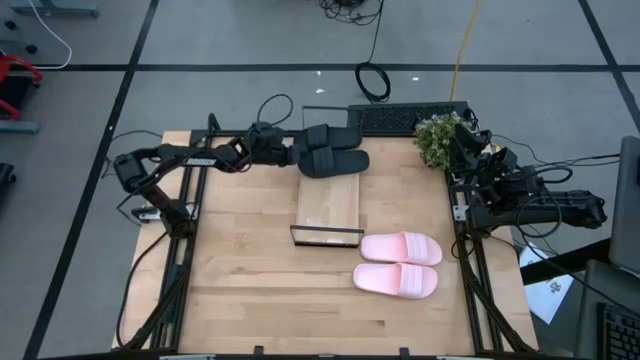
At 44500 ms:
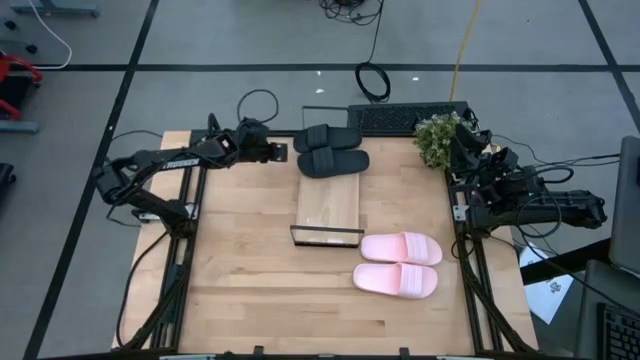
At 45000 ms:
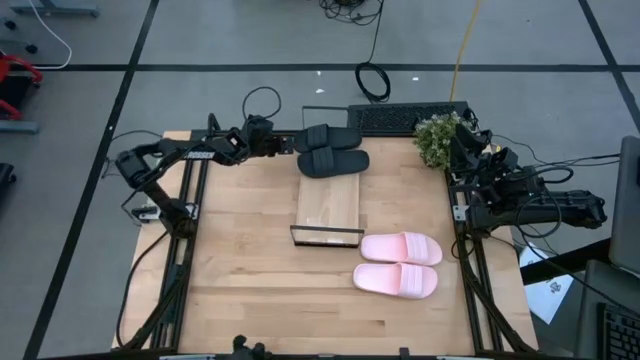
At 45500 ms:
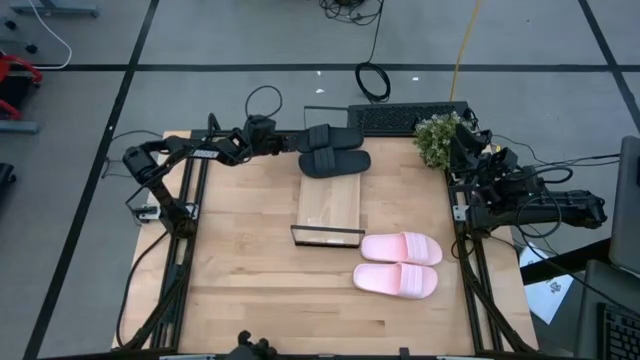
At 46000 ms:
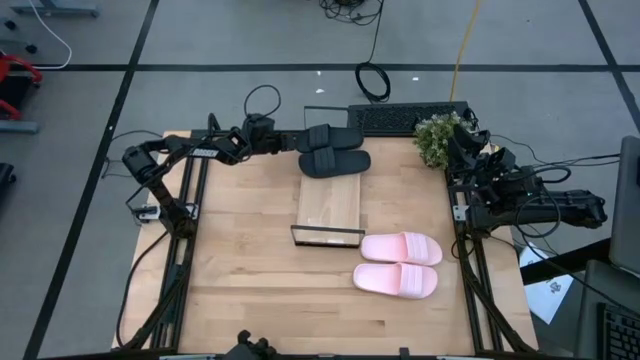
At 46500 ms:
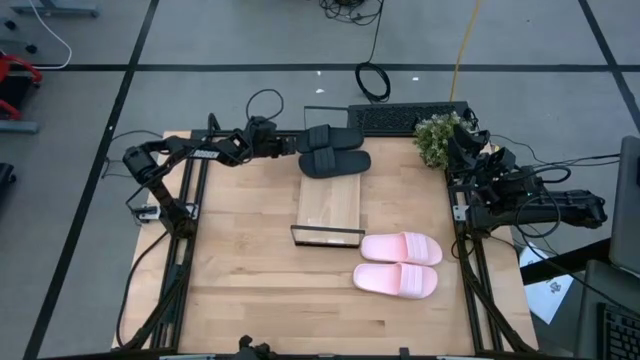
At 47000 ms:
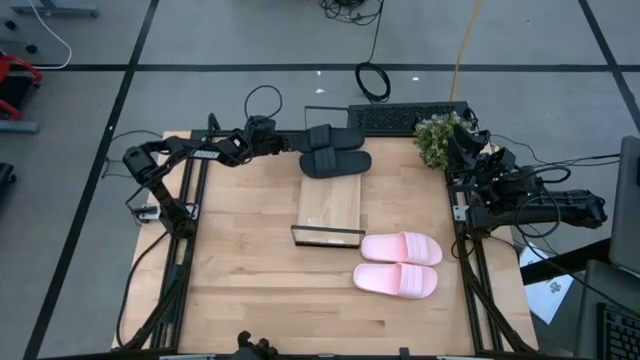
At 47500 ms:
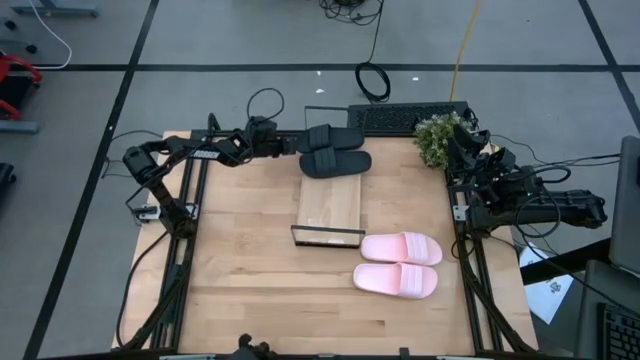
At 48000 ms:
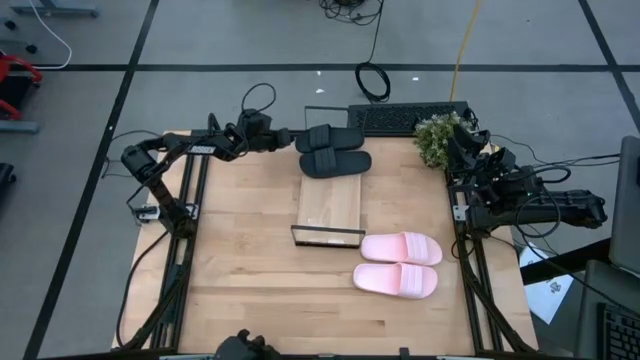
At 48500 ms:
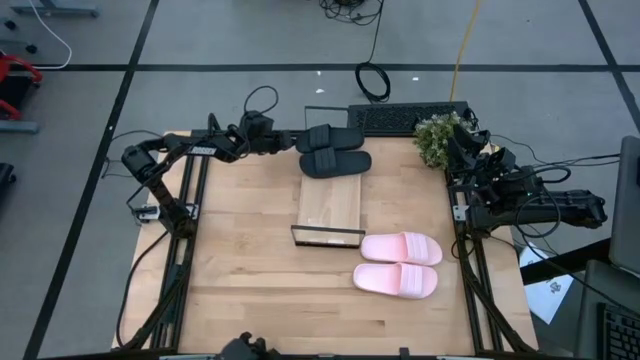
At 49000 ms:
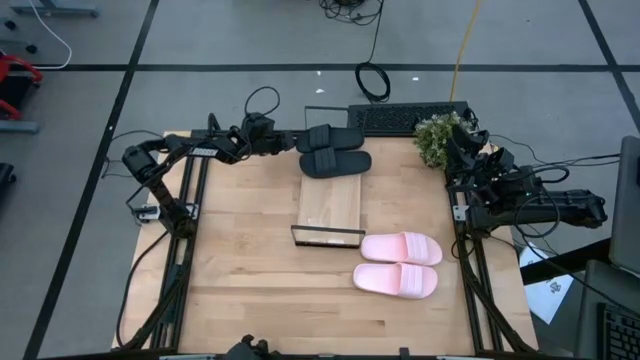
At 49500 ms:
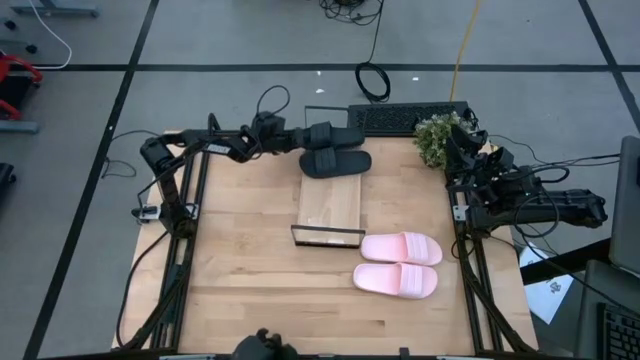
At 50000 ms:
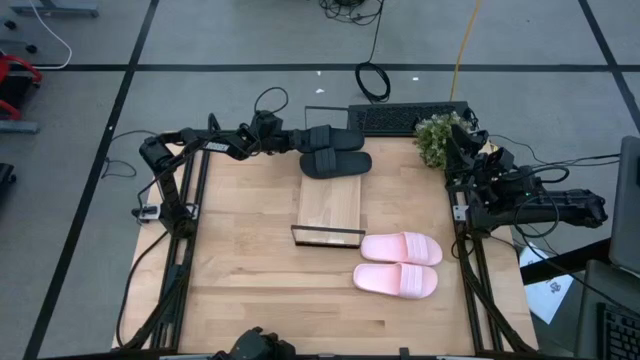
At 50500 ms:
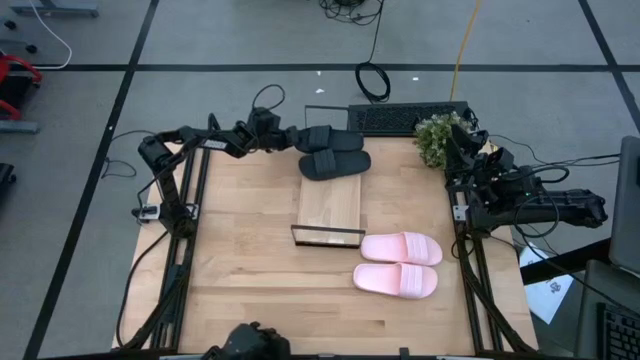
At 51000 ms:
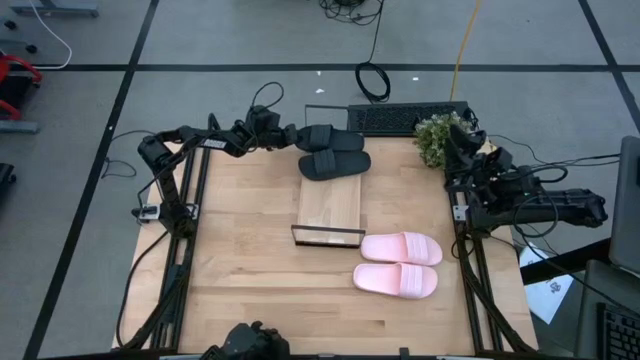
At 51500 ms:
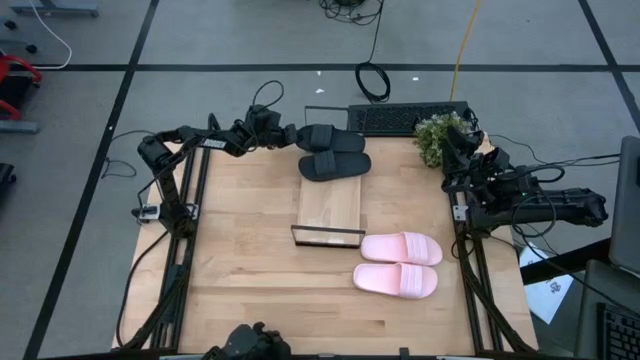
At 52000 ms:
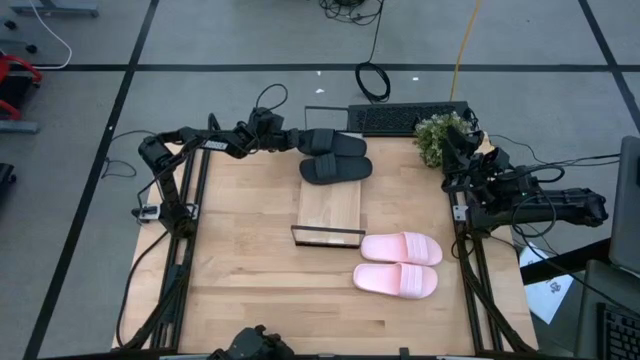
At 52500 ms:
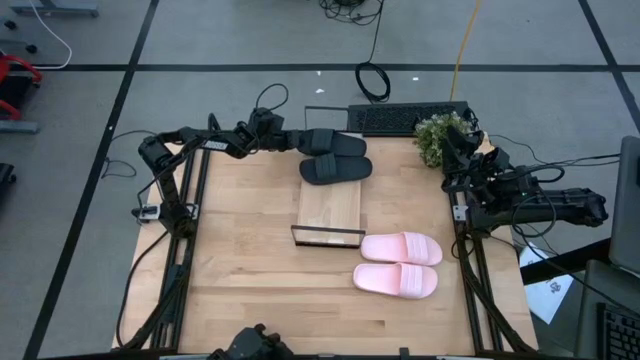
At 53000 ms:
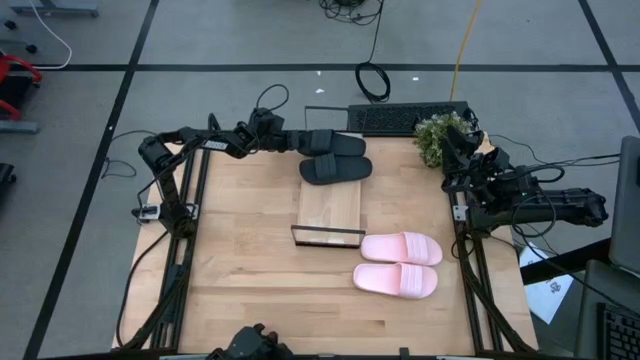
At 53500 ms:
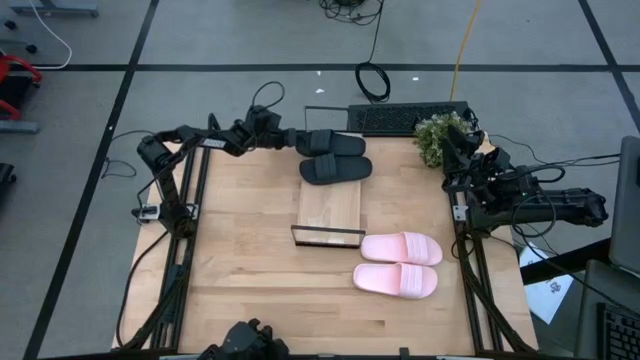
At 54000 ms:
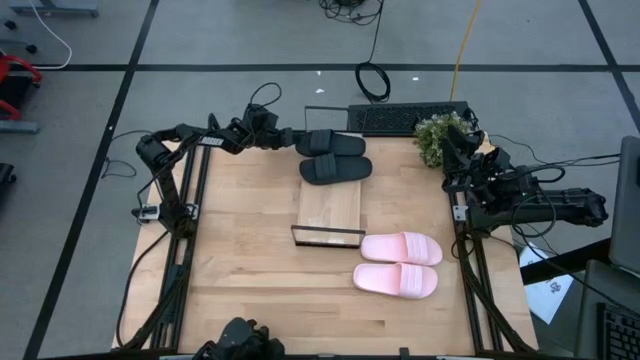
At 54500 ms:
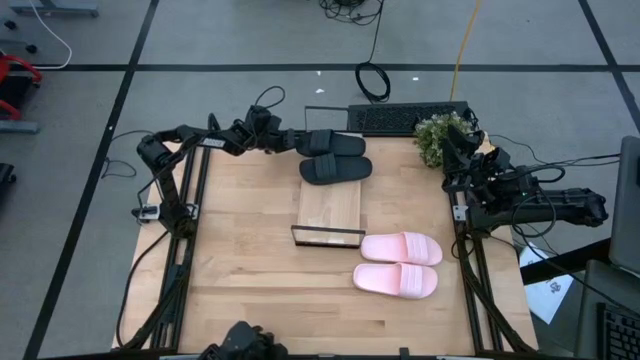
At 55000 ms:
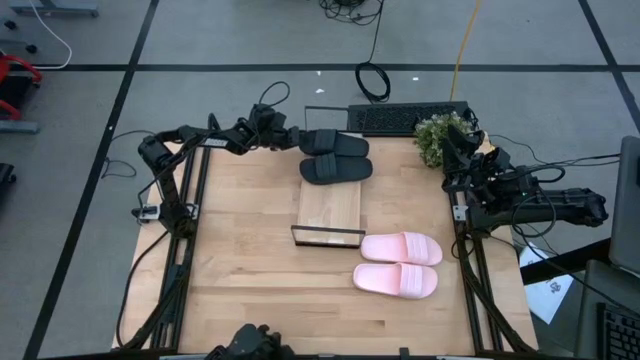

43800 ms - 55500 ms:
Task: Pick and place slides into the shelf
Adjust the black slides on the shelf

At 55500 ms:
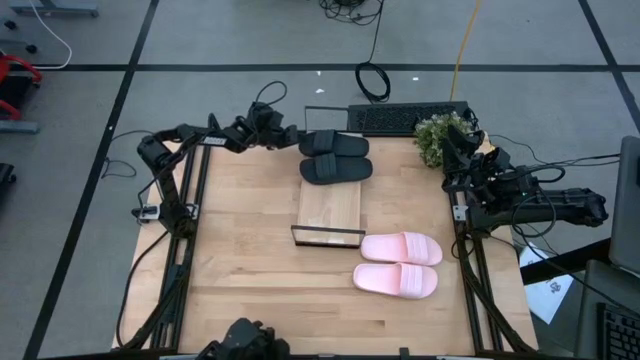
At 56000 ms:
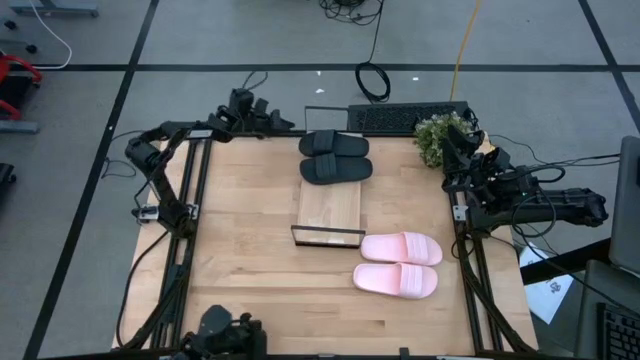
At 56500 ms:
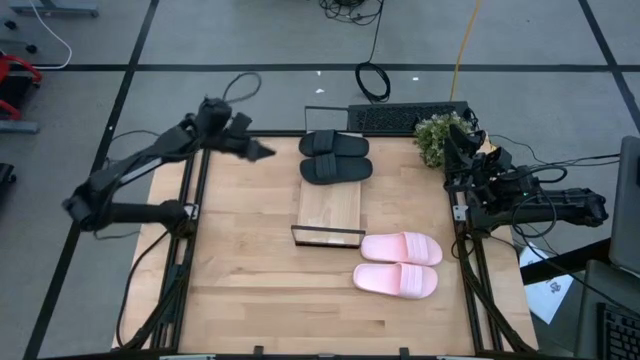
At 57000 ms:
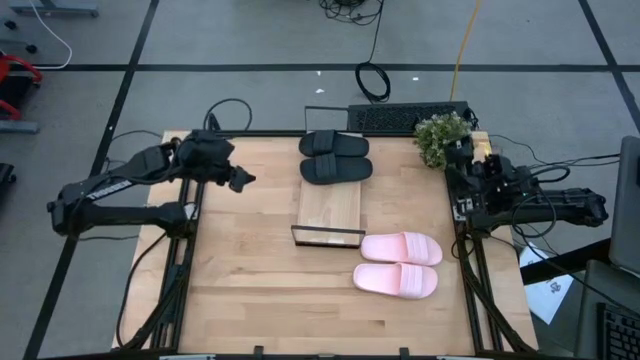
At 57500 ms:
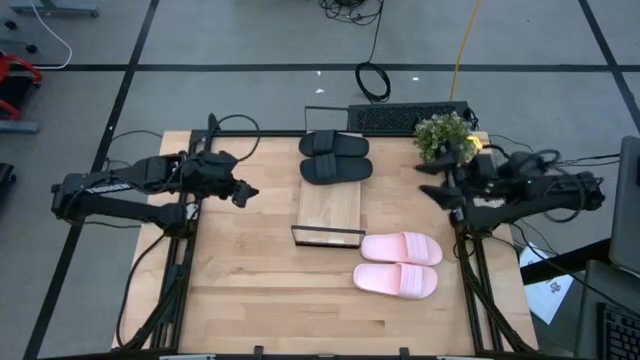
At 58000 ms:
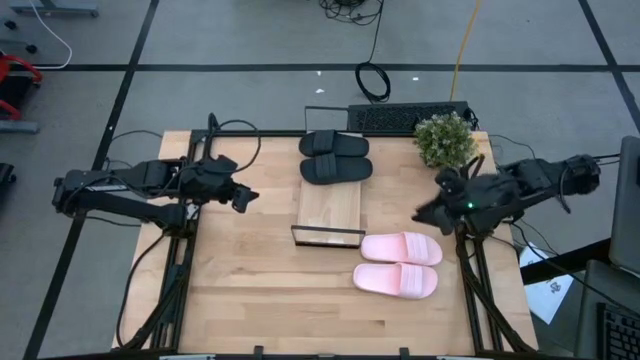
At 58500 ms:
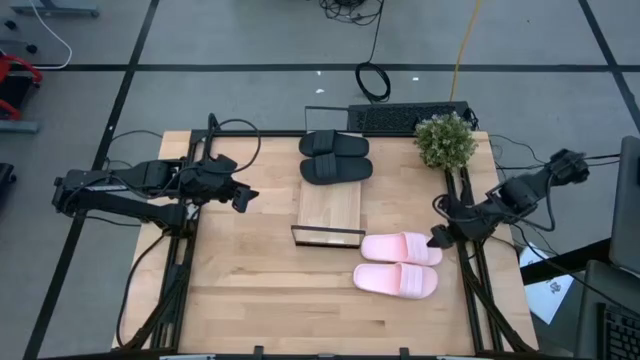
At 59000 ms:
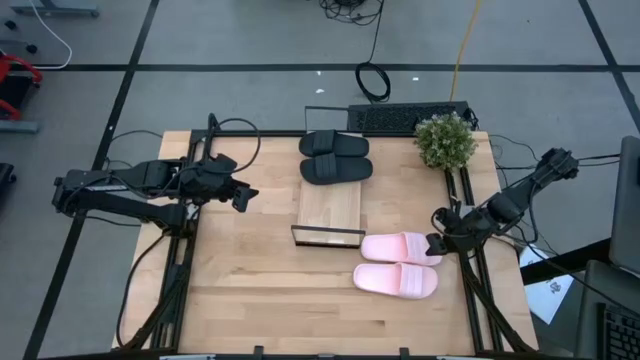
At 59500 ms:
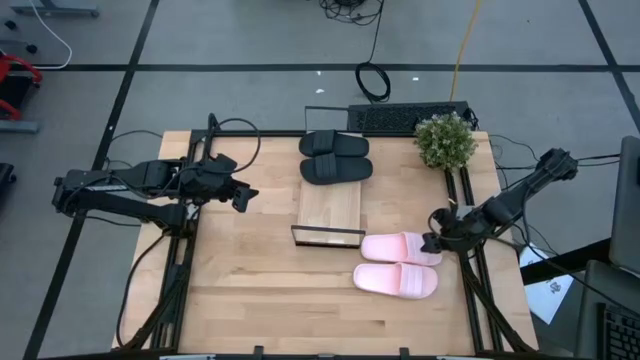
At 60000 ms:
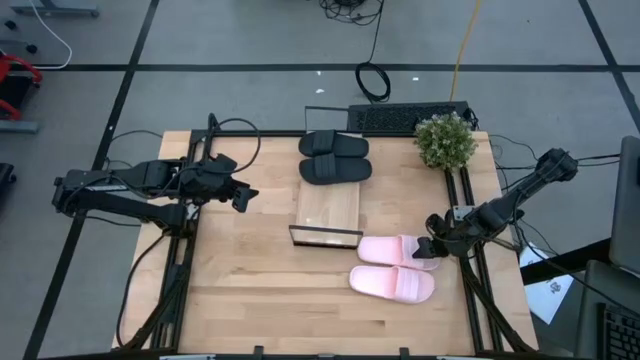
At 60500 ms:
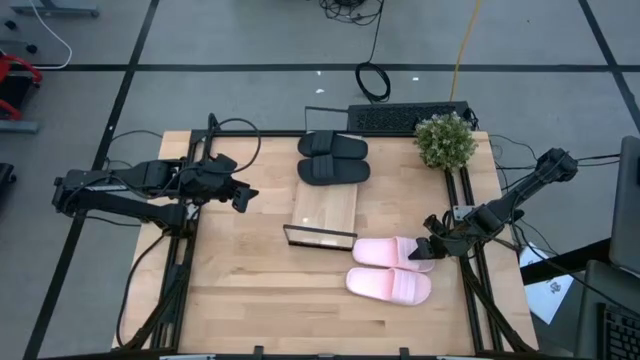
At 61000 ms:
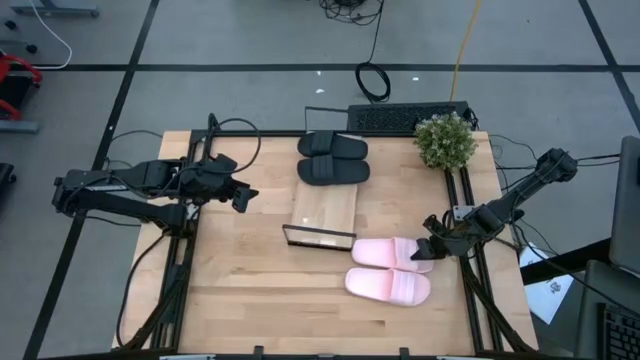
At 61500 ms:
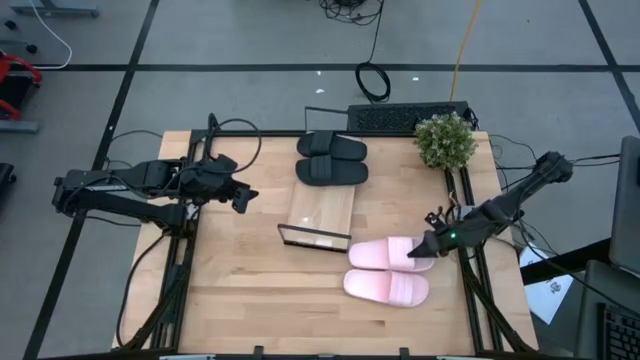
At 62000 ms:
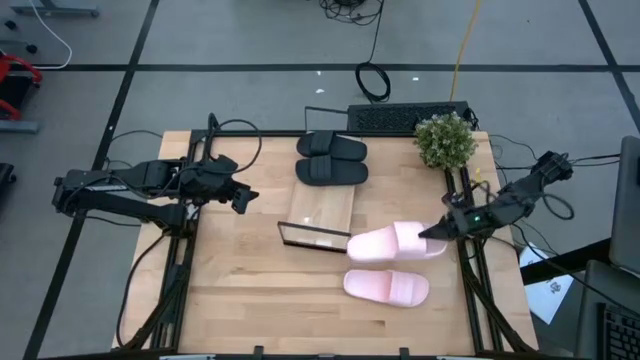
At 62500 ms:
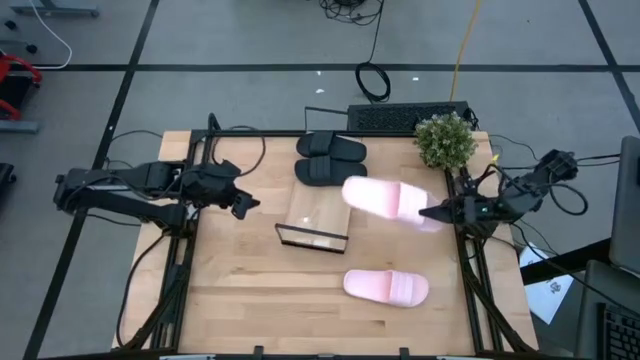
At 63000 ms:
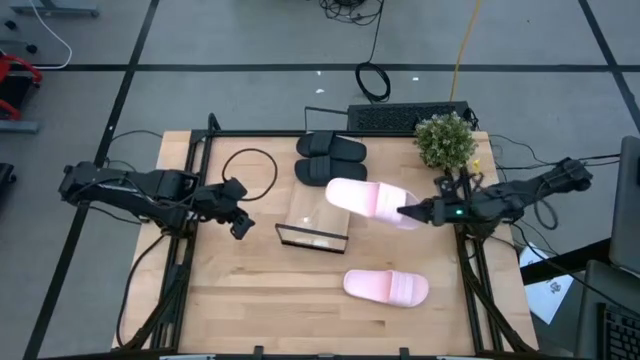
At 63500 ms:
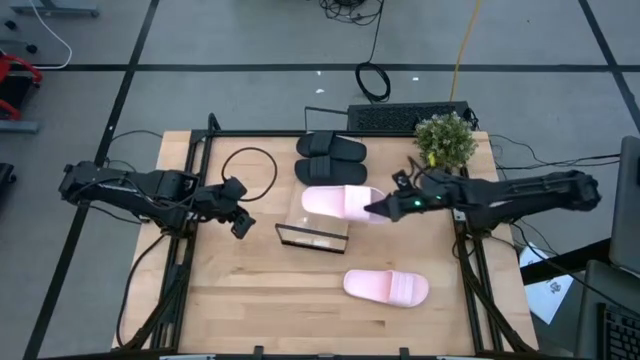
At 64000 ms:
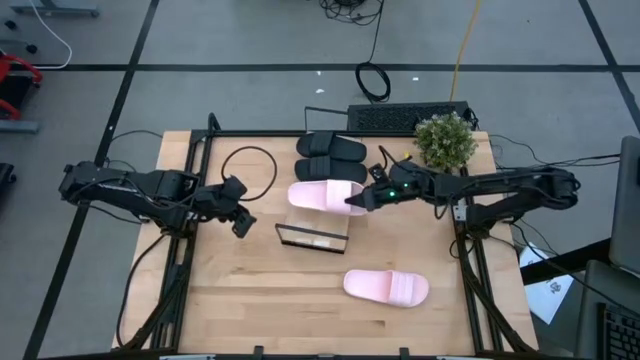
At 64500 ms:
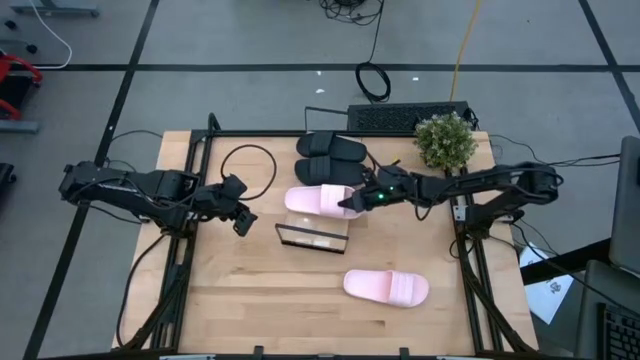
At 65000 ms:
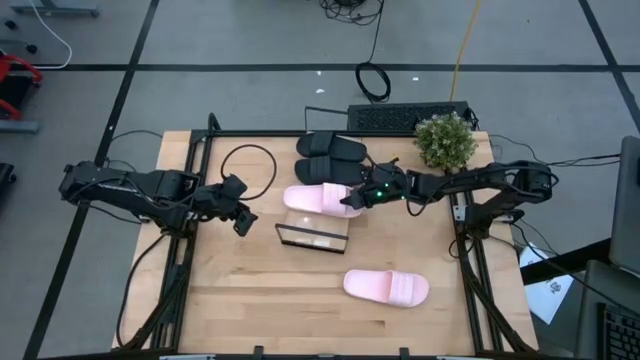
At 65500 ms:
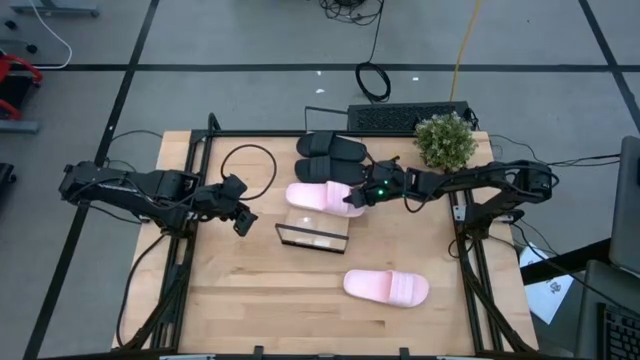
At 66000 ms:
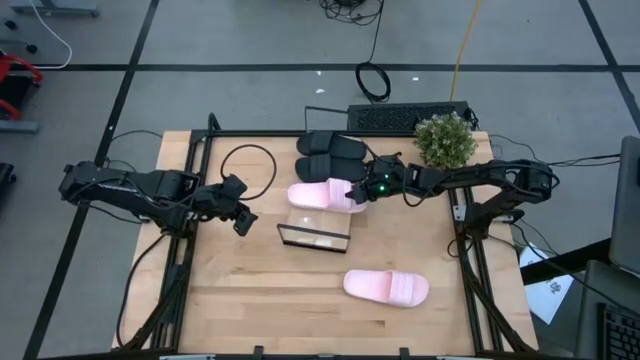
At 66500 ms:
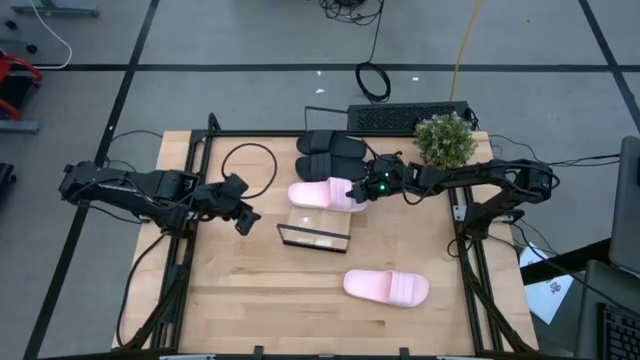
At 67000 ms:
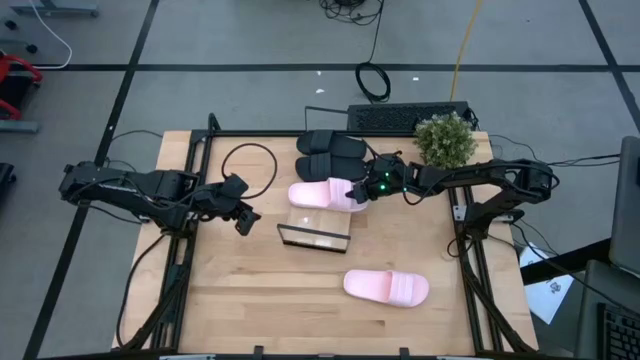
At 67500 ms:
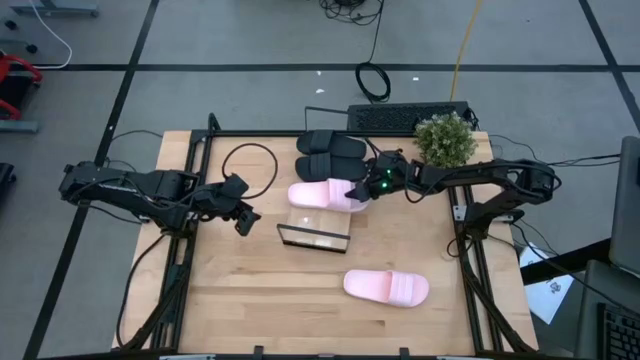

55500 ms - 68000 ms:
Put the top pink slides on the shelf
